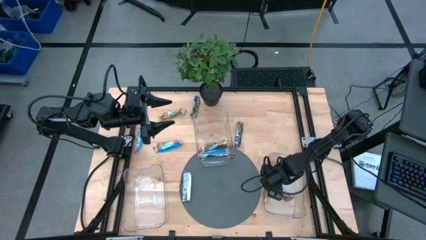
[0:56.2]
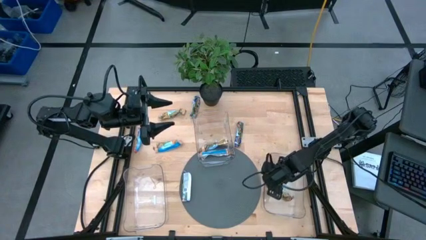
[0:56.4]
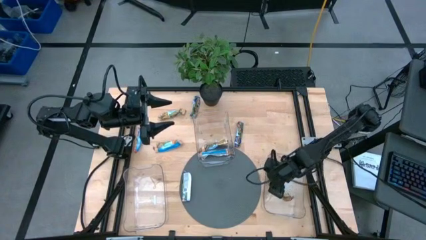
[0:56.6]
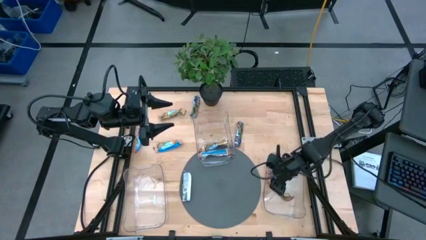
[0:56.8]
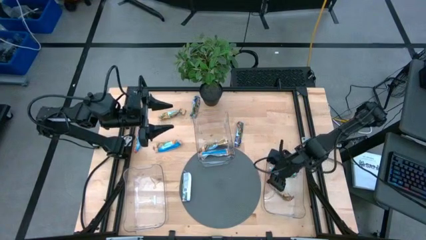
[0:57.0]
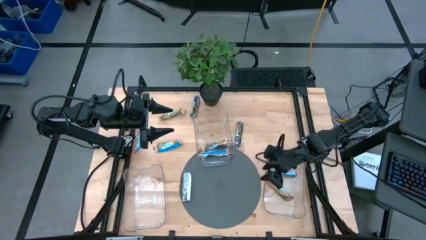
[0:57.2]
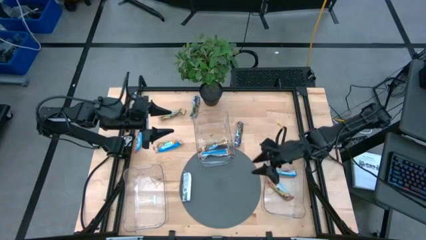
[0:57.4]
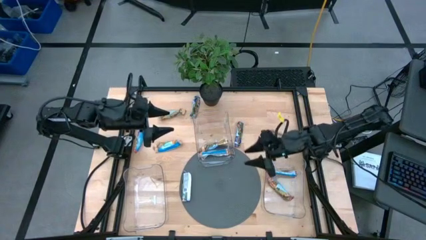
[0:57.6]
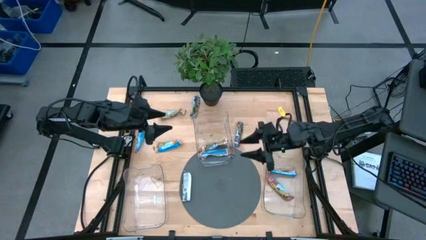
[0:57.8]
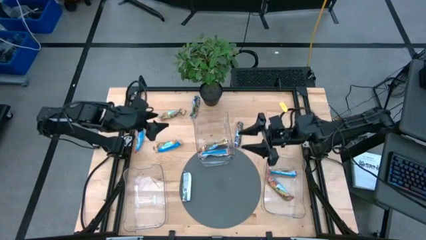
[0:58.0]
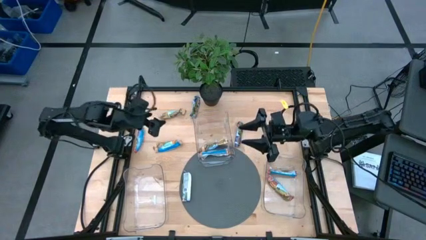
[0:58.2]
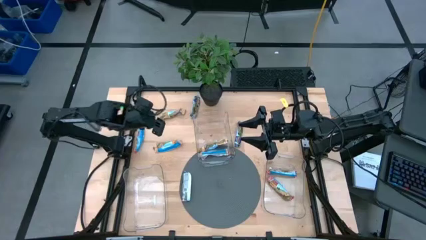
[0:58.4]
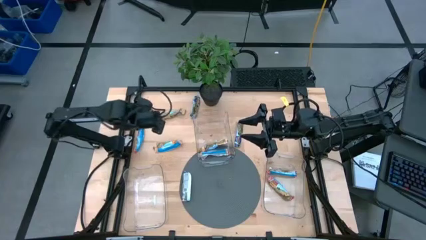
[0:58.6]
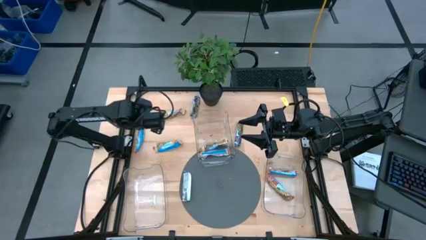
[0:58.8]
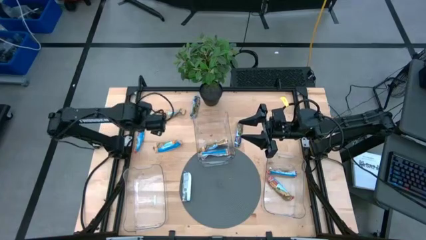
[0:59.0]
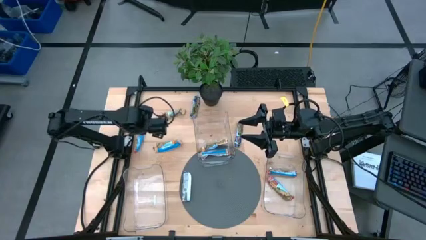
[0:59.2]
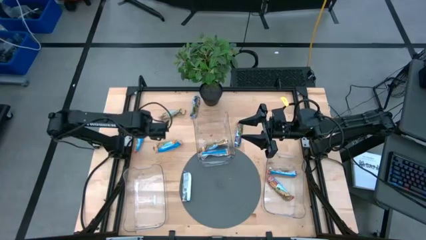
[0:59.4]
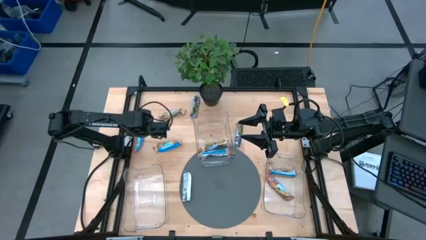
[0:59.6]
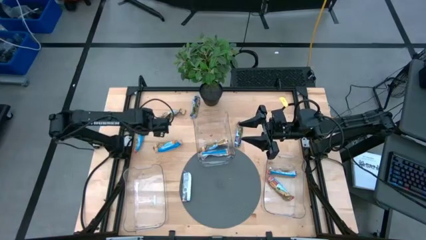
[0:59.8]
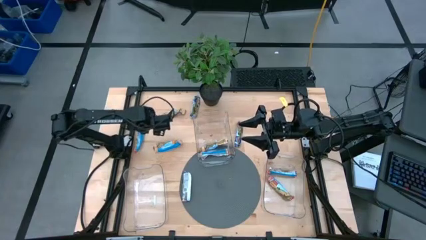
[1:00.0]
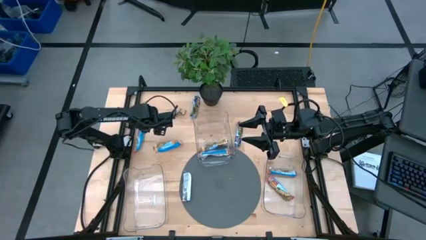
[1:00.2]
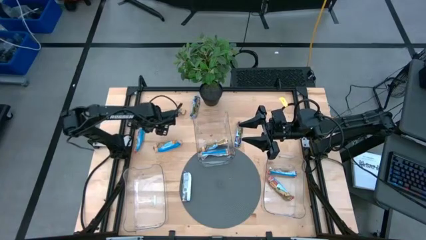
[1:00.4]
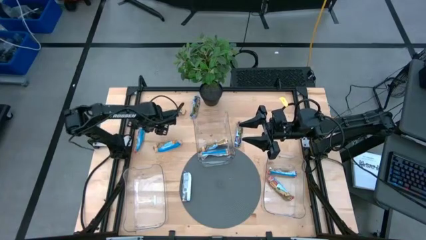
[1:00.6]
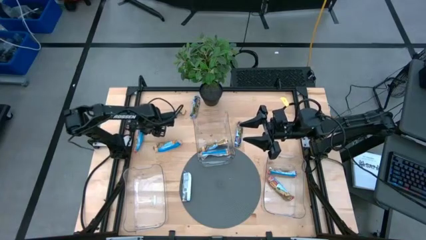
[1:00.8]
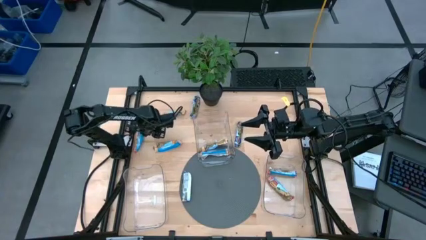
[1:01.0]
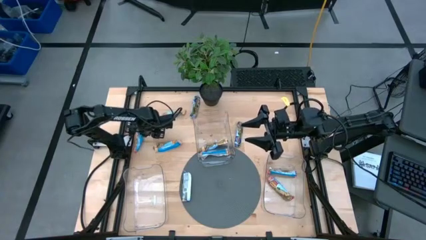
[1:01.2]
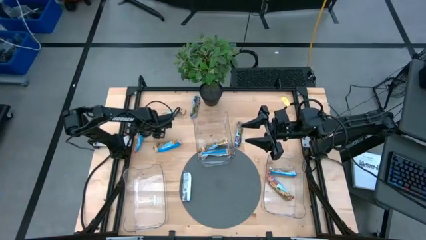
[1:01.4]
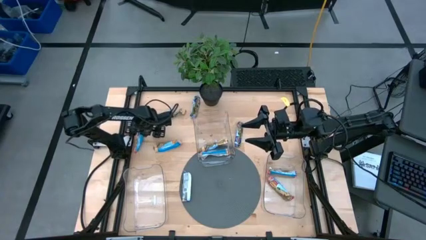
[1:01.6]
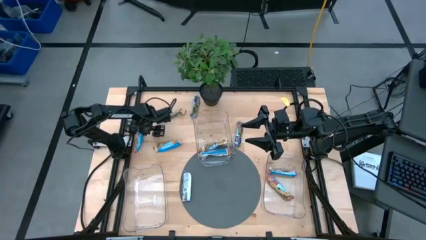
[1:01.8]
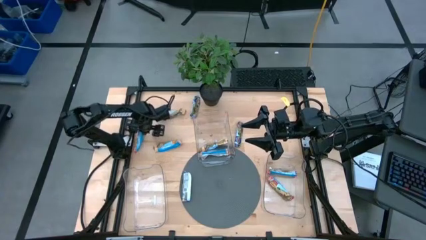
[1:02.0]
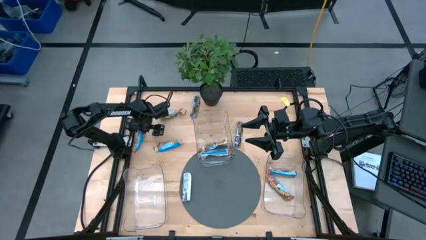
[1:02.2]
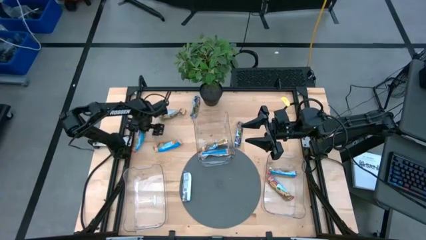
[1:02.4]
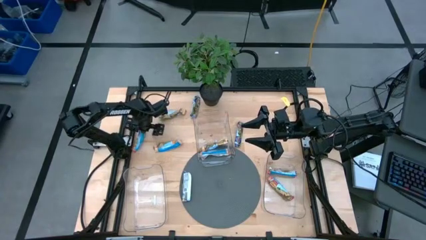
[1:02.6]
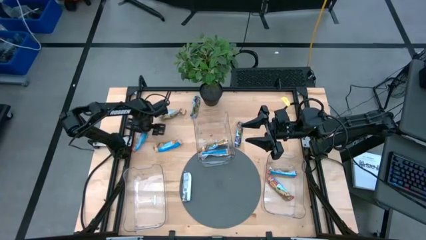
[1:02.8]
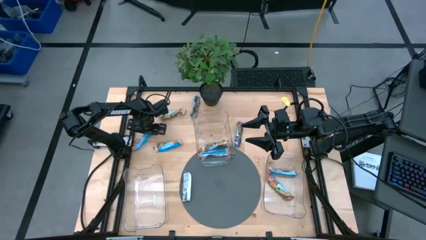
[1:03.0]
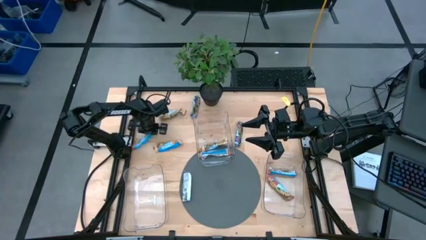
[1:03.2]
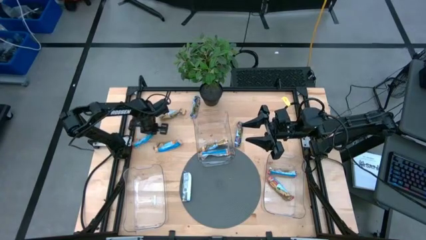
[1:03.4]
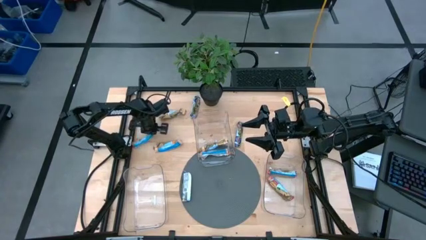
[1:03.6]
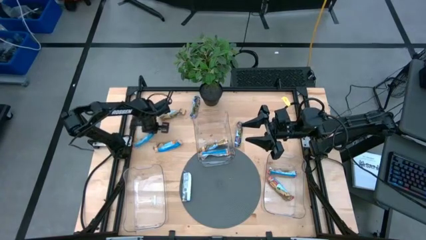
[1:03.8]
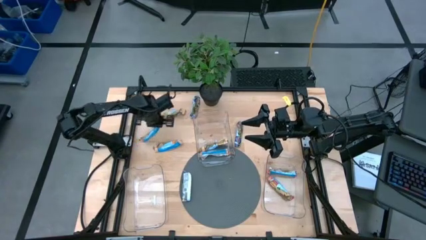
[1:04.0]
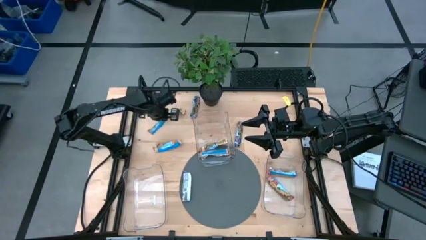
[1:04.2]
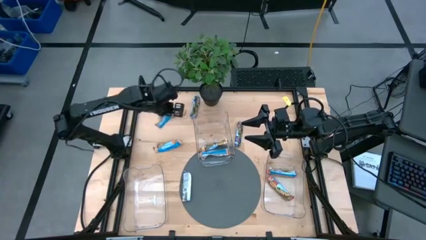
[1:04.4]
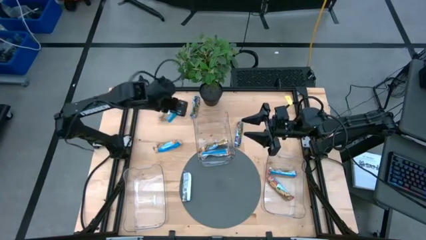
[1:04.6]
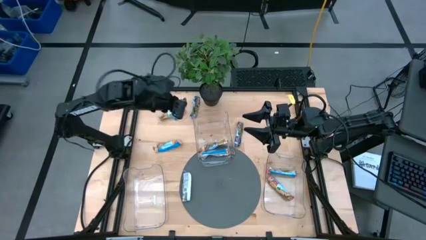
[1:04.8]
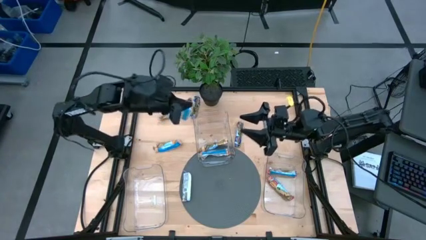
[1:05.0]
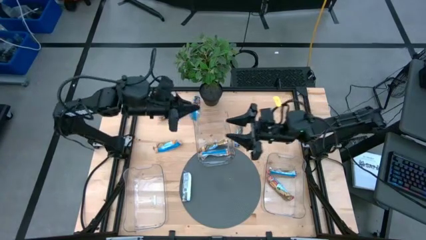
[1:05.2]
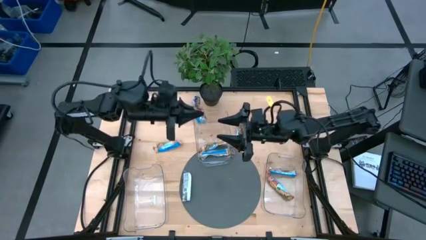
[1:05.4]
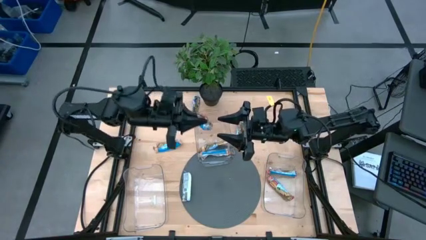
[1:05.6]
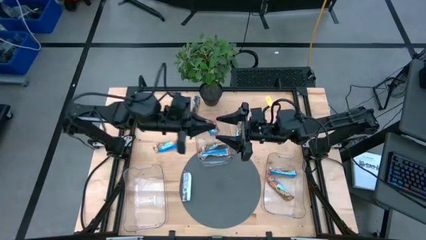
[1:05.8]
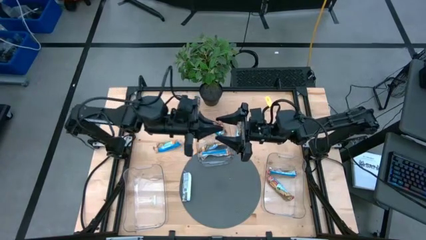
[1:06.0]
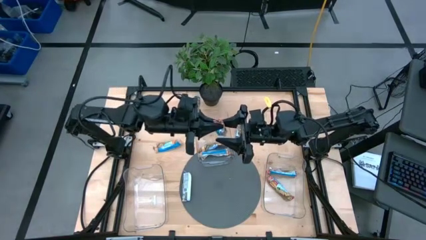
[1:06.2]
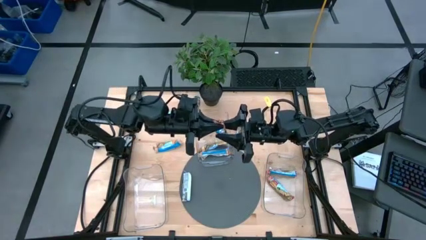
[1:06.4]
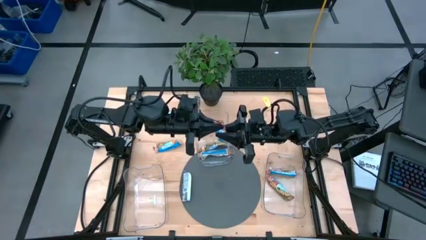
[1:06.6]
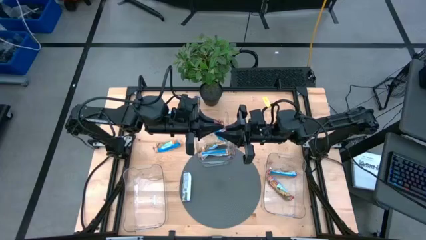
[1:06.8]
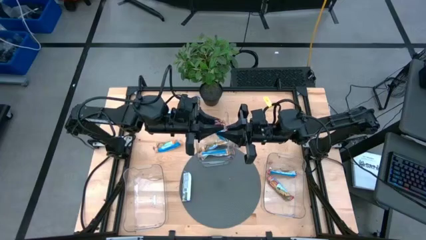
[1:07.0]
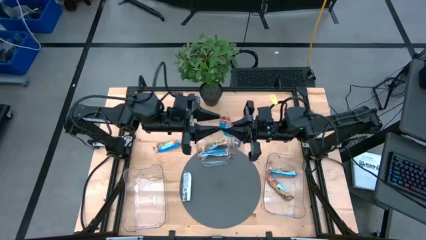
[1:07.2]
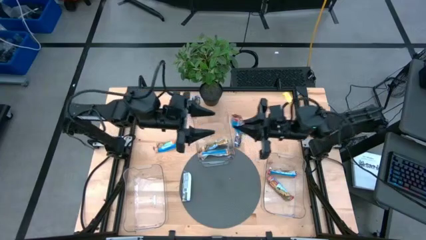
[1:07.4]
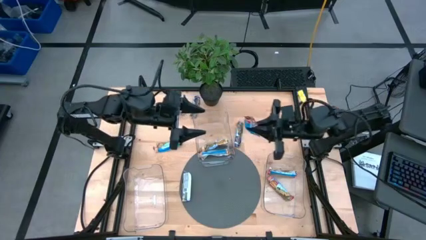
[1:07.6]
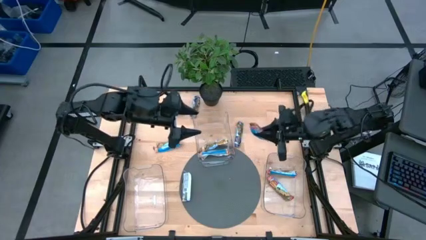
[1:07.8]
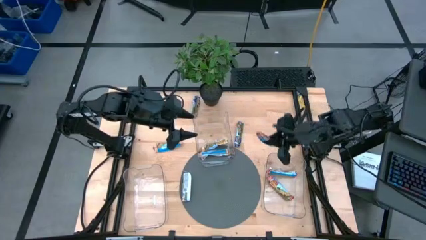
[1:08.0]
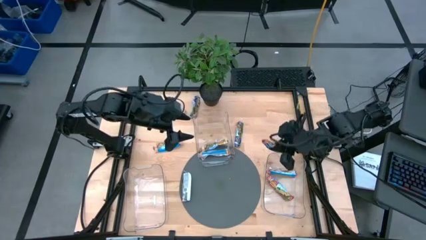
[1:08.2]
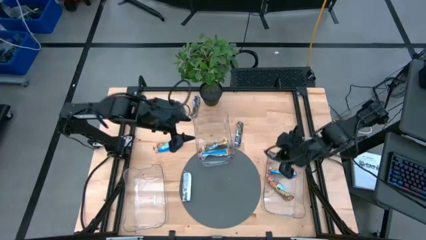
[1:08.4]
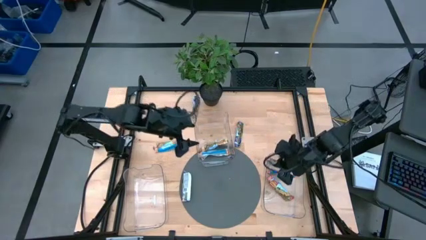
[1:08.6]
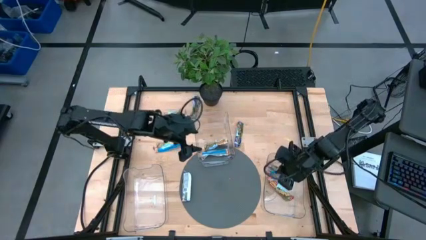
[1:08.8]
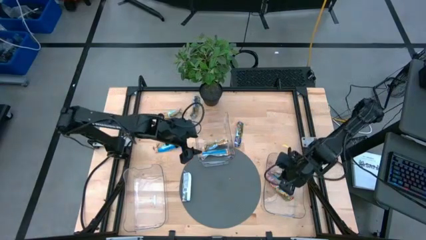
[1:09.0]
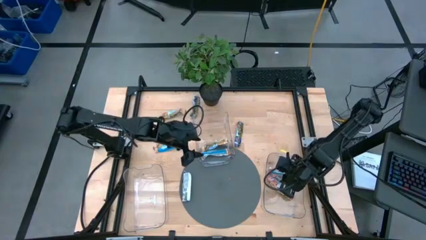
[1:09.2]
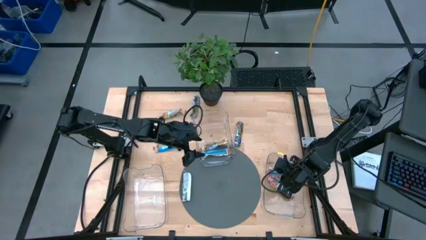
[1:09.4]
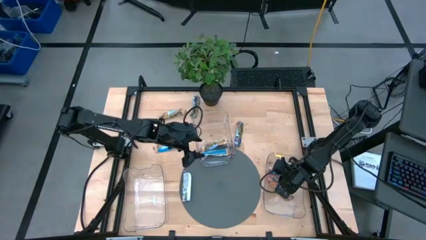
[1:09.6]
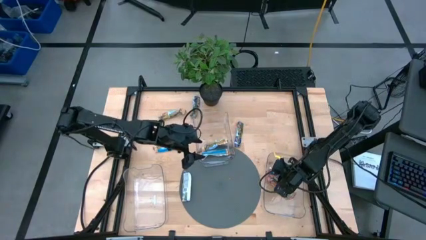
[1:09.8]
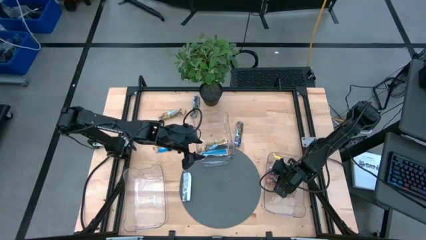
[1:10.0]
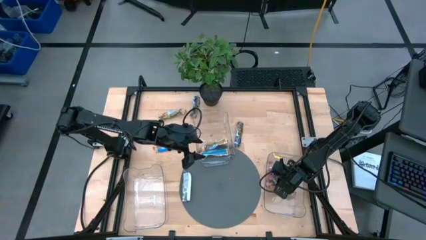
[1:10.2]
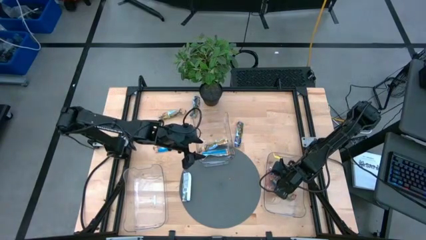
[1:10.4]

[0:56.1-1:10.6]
Task: Pick and place Granola Bars by type
Put the red granola bar into the right transparent bin
